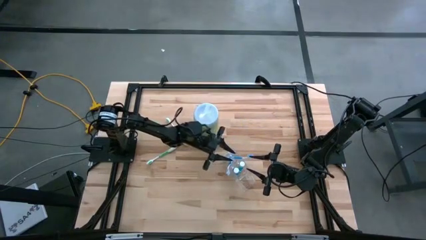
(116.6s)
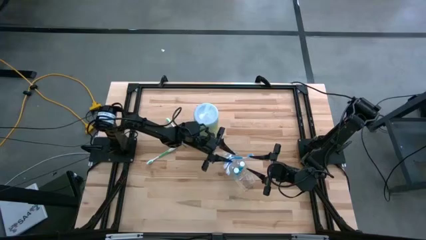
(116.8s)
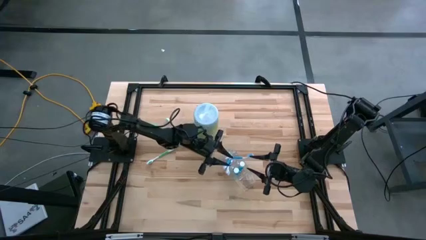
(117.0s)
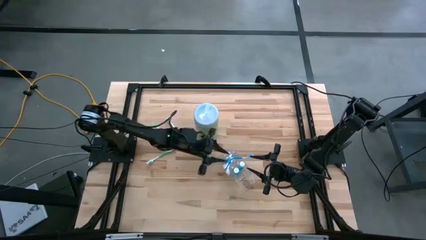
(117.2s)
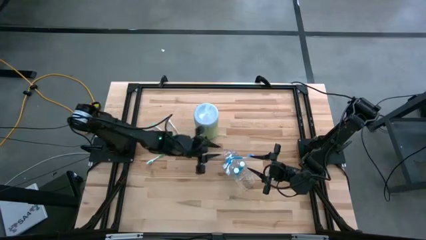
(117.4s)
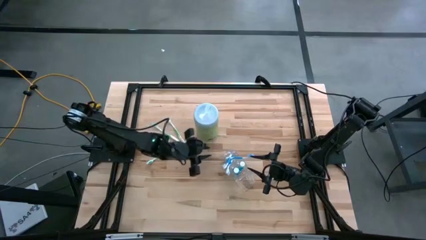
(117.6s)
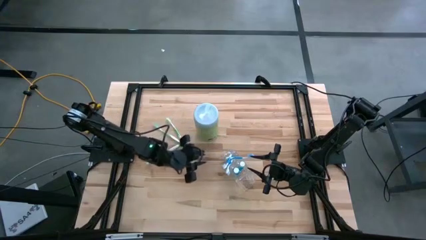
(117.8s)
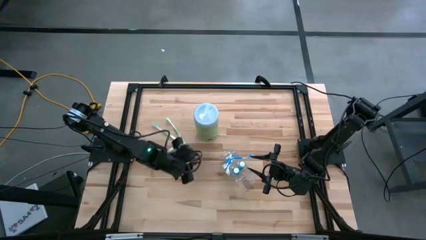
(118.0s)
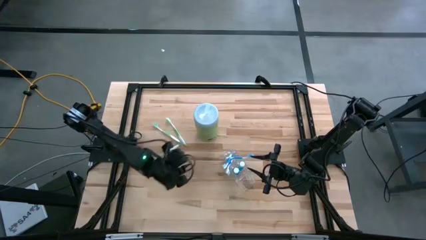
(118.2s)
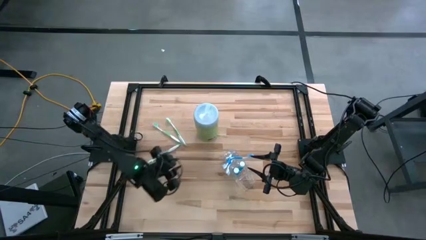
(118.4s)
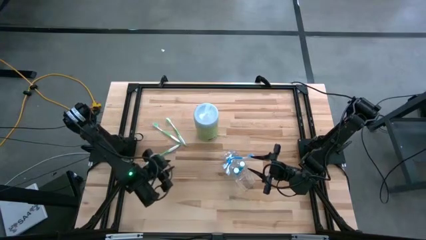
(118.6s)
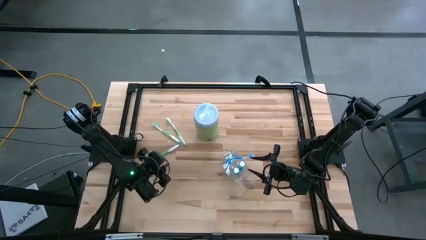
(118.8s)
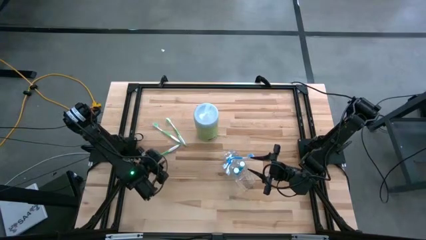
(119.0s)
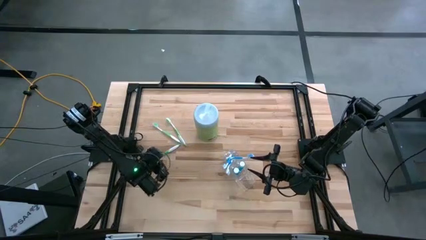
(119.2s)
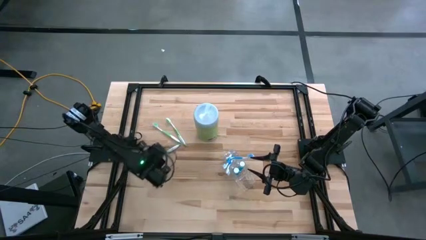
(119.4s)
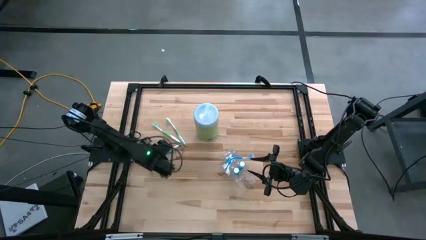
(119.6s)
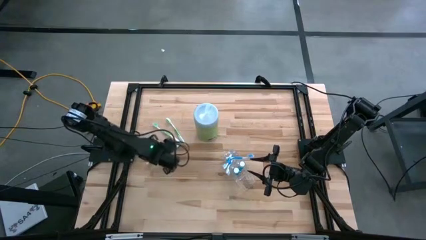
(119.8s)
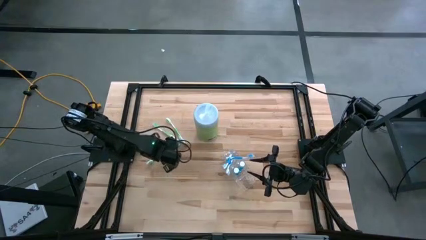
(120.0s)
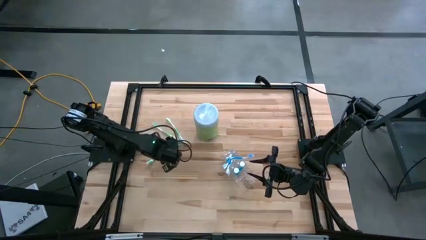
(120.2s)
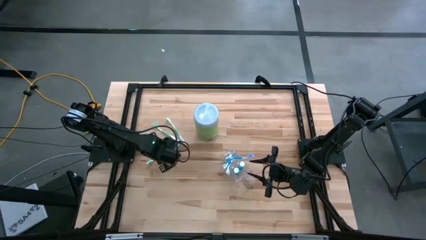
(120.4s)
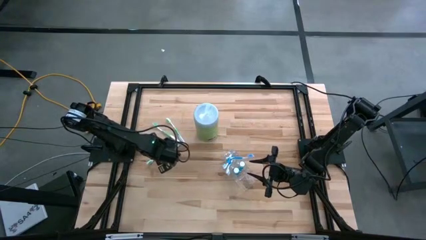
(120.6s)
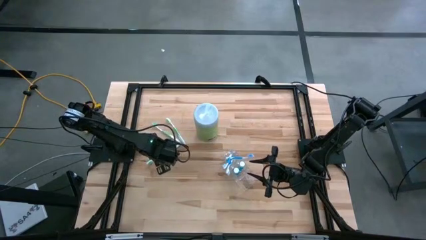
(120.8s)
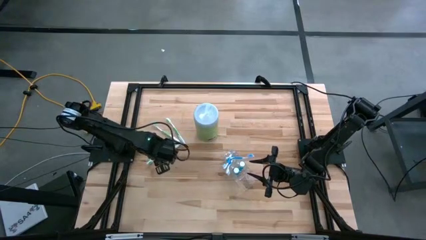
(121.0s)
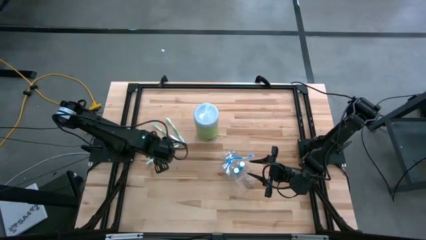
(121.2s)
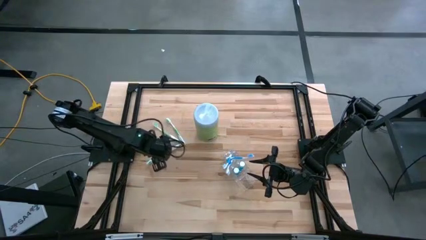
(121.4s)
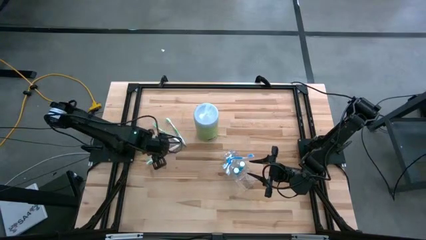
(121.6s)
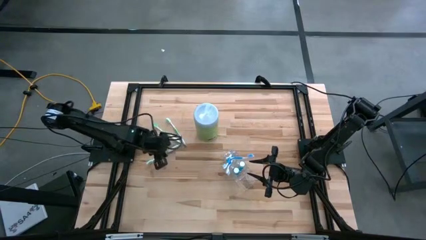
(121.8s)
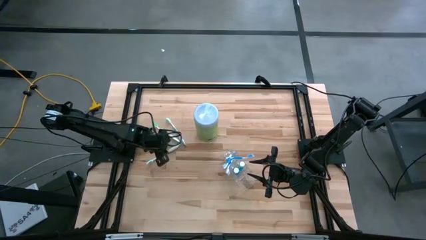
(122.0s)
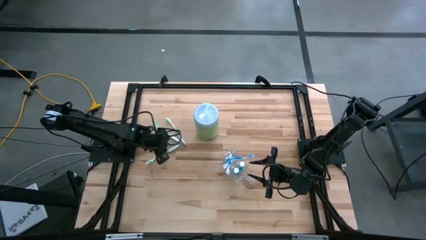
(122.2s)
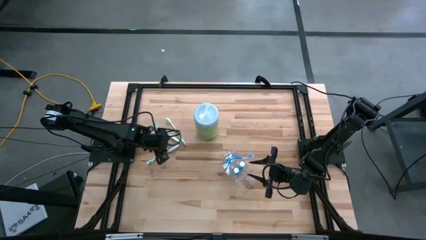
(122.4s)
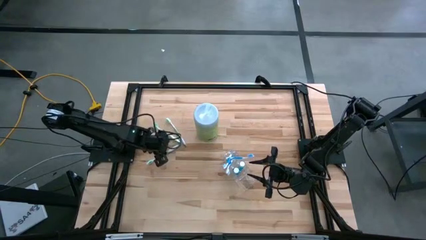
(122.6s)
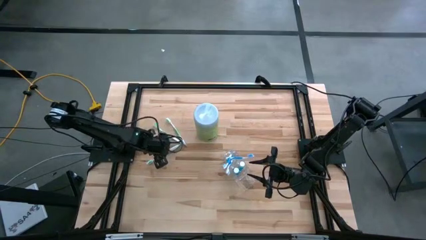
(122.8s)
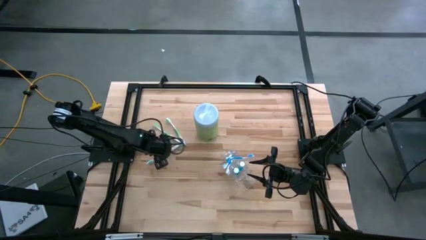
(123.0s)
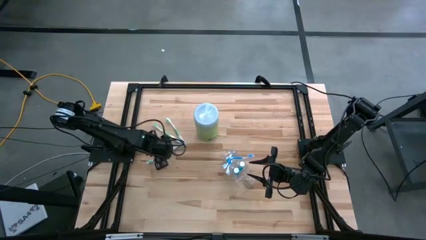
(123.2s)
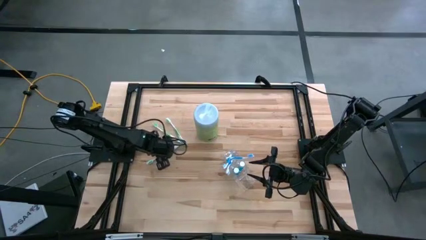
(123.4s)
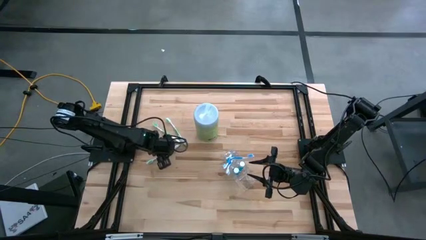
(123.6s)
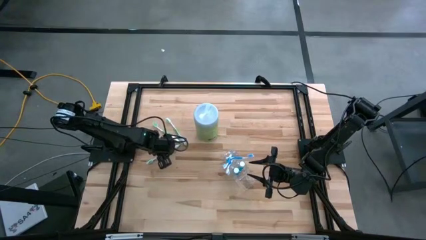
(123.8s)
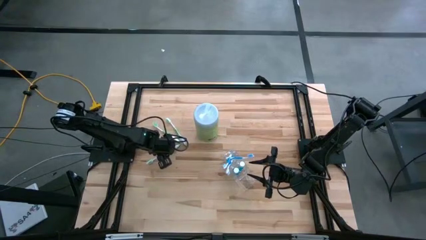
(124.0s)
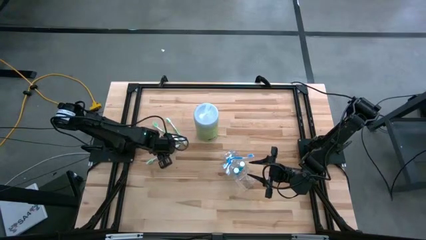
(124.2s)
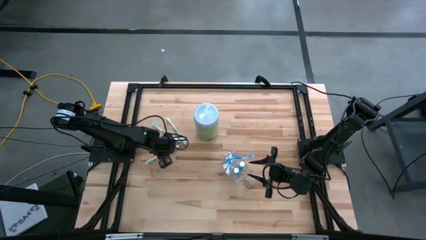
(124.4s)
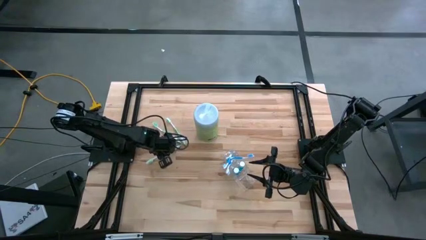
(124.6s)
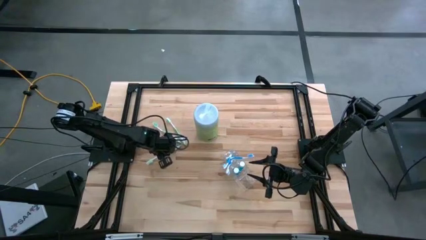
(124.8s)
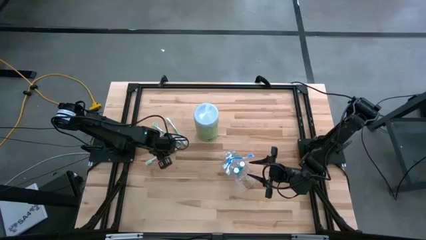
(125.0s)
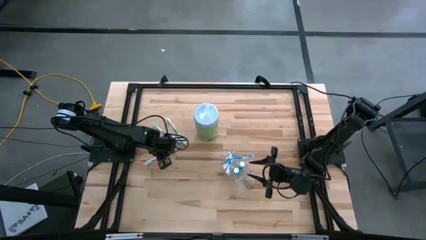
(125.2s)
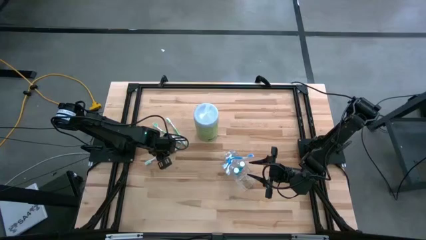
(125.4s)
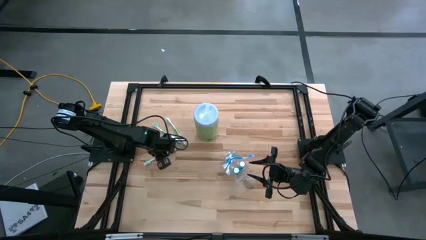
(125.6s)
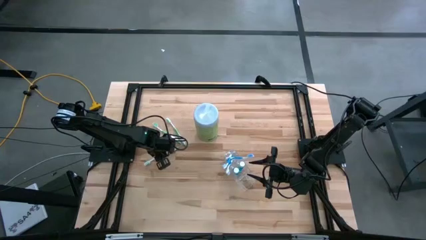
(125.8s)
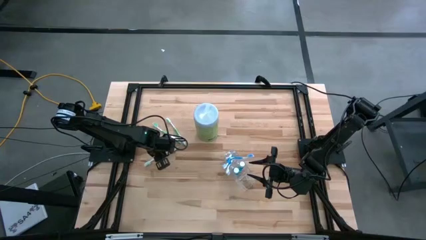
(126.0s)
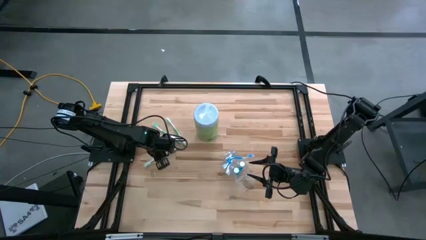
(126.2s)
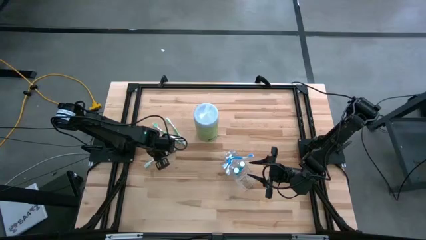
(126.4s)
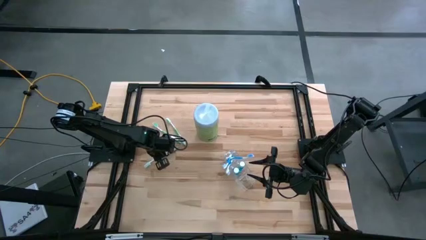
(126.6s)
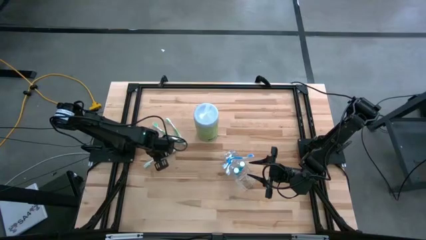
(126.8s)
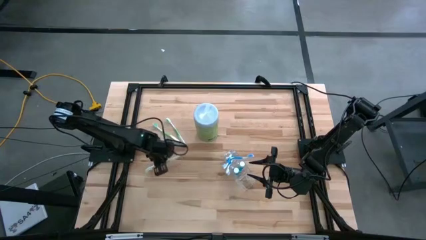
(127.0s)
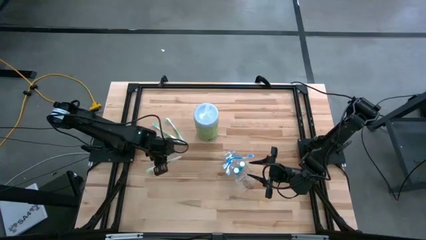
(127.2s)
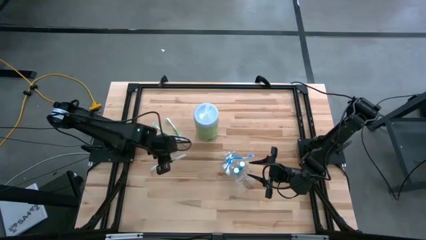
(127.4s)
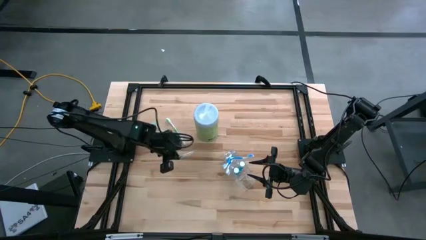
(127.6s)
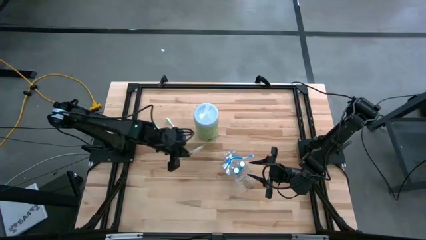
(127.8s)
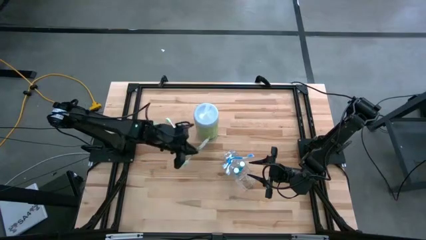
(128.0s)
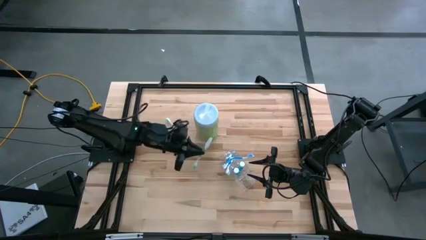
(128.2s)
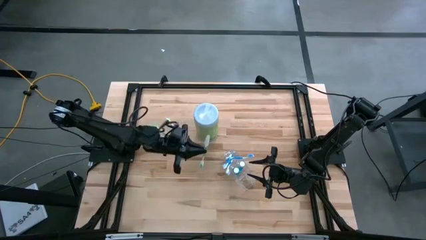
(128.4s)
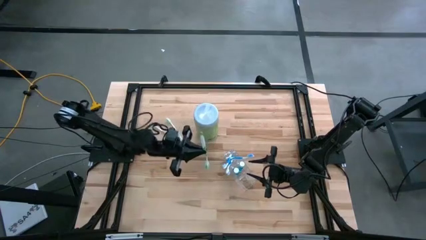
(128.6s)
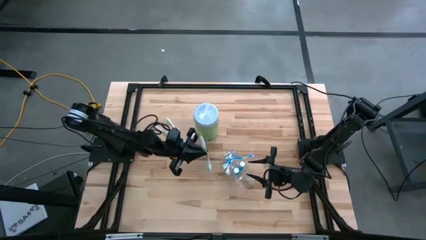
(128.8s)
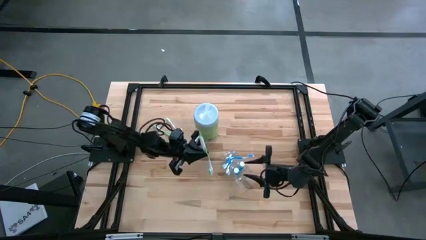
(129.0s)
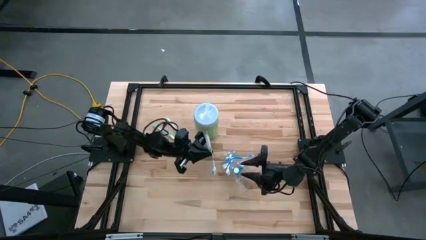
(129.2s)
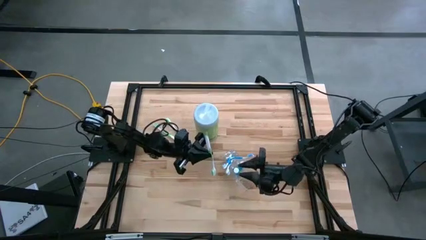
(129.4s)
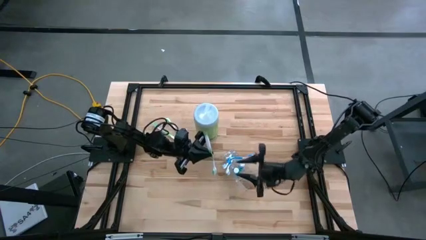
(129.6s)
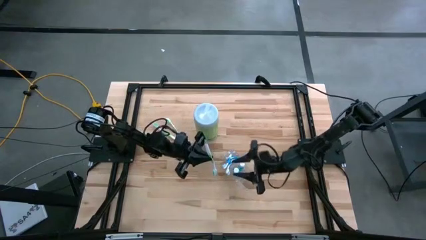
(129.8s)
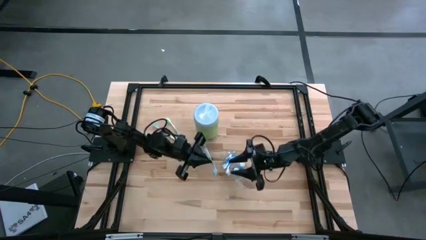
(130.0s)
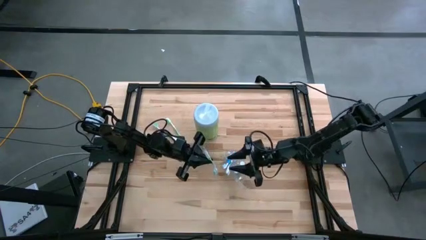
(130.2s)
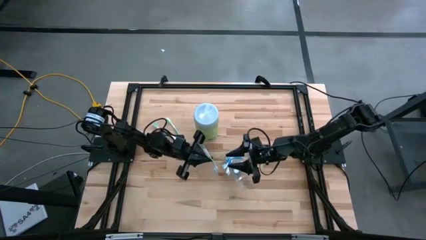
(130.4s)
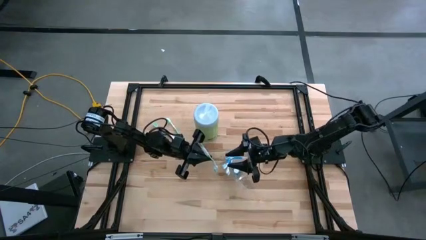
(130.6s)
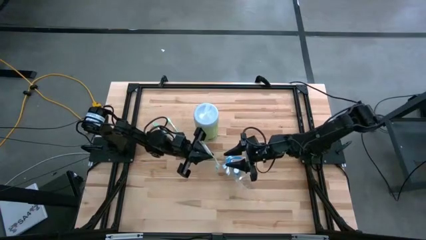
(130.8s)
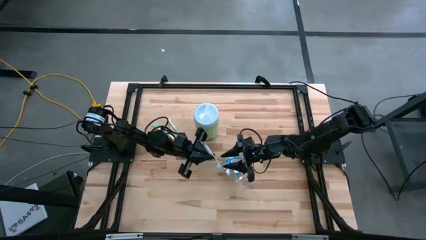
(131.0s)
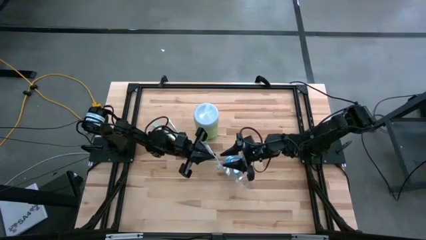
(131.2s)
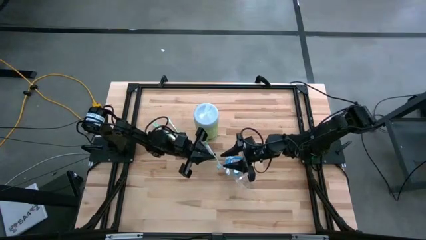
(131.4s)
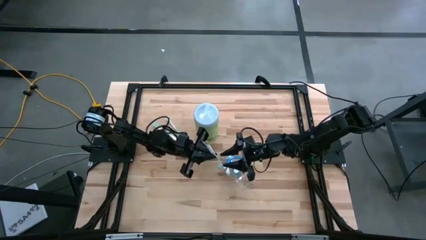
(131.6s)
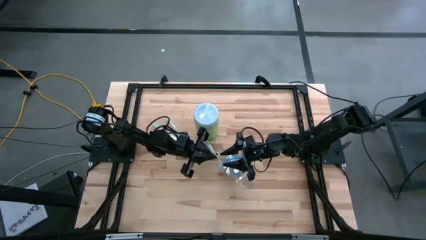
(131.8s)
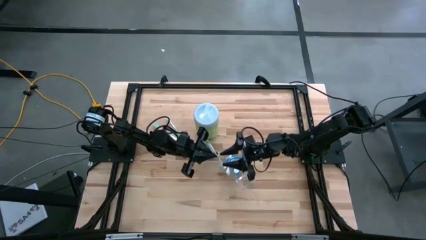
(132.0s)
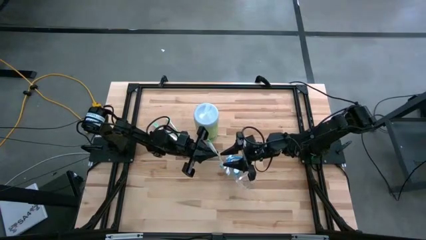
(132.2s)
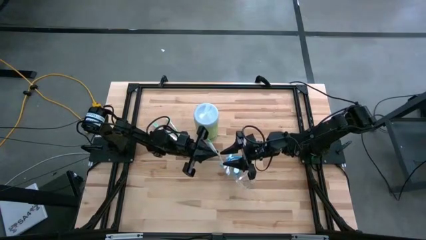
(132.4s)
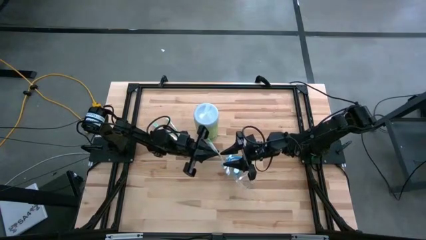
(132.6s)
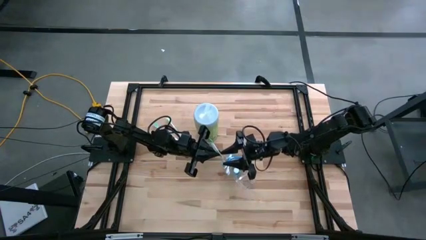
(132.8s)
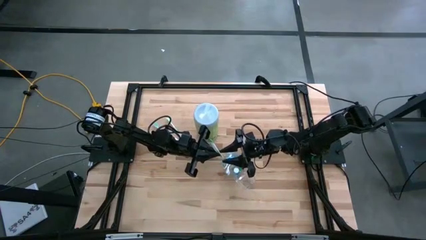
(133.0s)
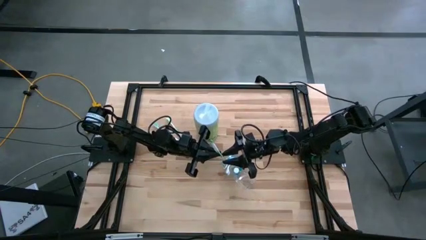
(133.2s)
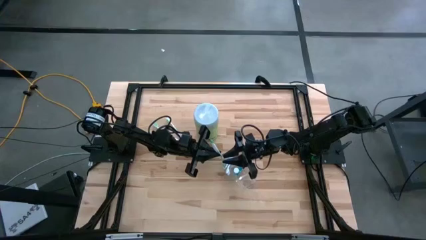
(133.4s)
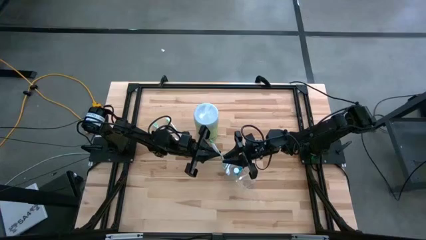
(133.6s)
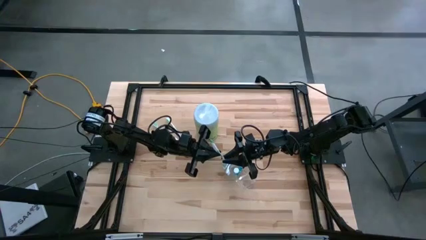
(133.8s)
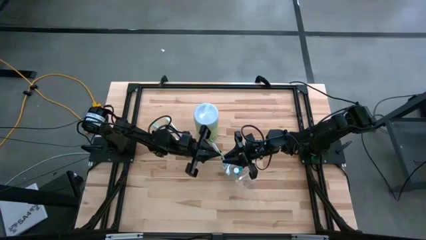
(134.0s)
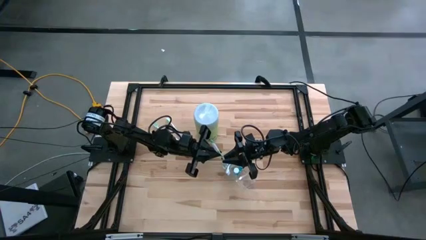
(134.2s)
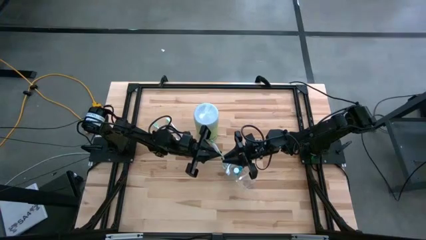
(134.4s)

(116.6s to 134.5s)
Task: Pick & Place toothbrushing station
Put the bottom green toothbrush into the transparent organizer
